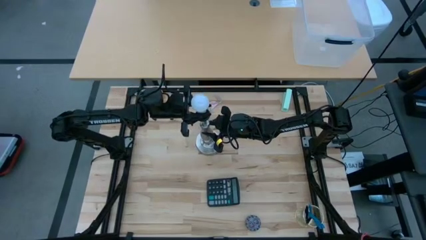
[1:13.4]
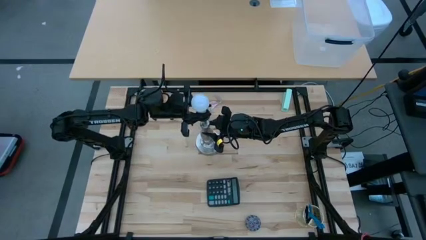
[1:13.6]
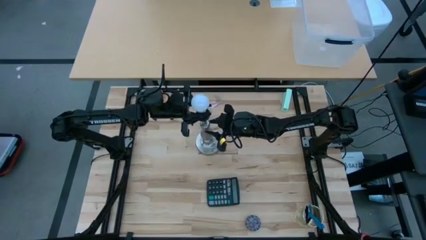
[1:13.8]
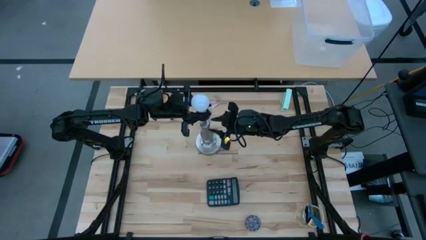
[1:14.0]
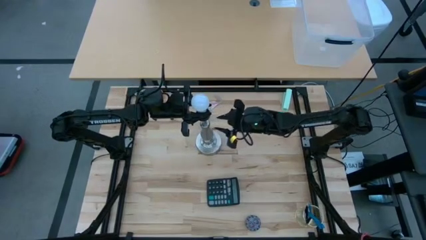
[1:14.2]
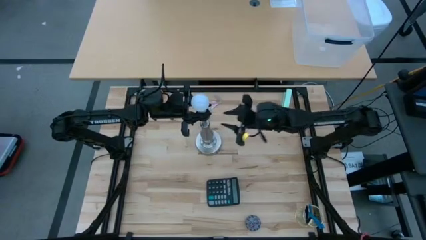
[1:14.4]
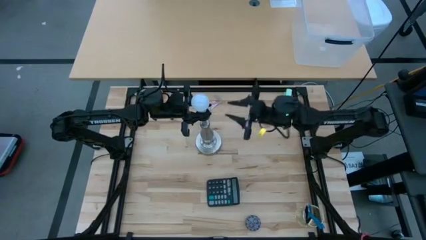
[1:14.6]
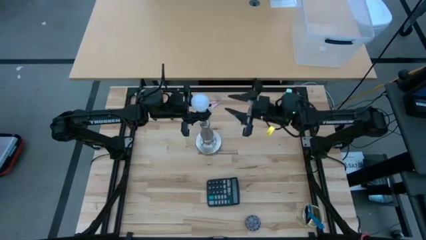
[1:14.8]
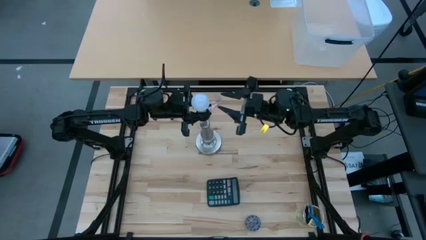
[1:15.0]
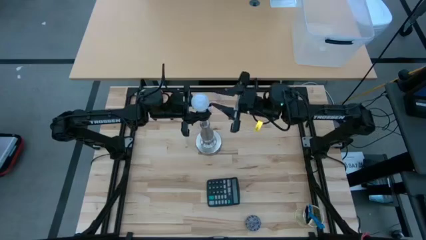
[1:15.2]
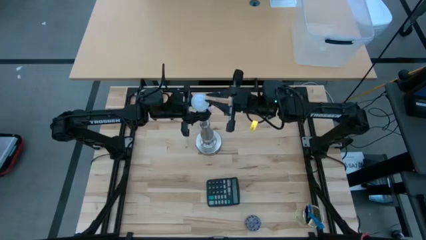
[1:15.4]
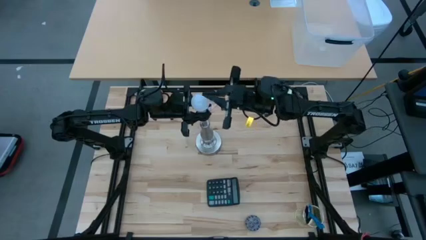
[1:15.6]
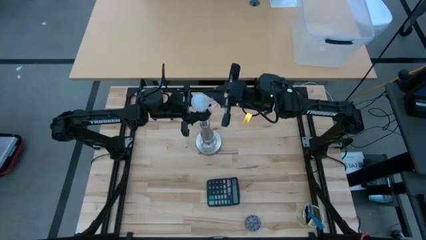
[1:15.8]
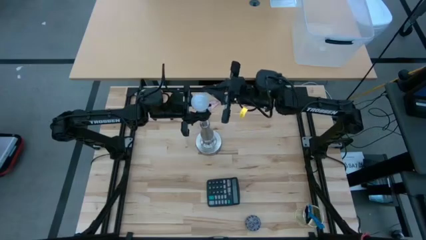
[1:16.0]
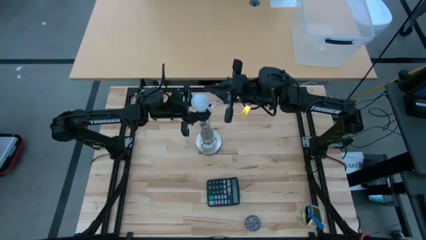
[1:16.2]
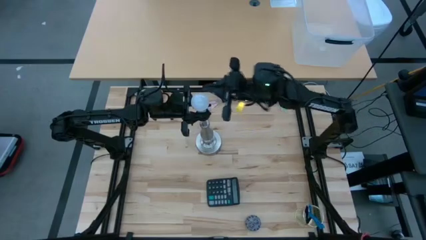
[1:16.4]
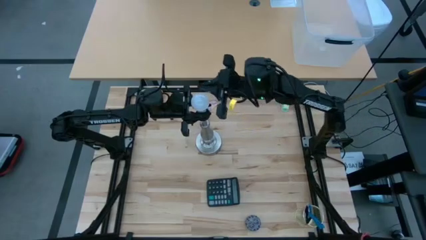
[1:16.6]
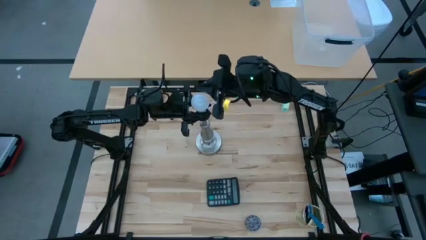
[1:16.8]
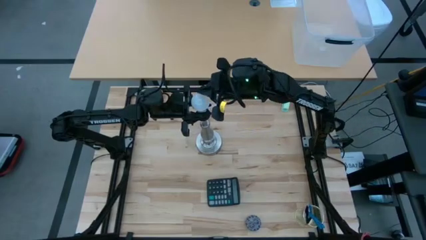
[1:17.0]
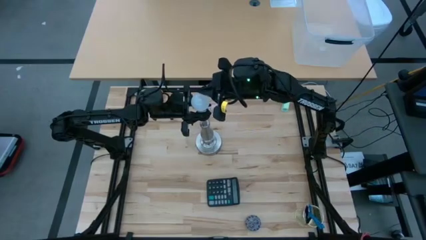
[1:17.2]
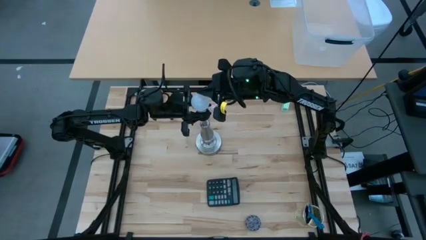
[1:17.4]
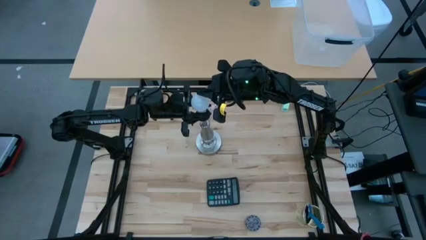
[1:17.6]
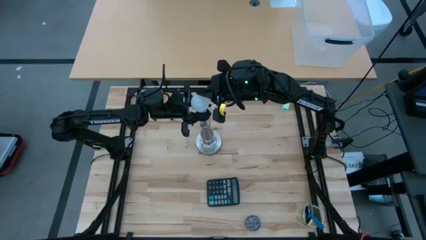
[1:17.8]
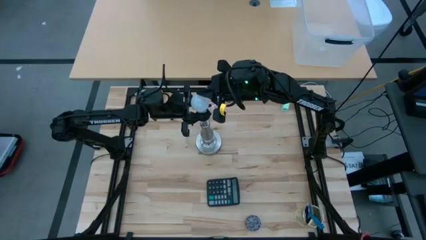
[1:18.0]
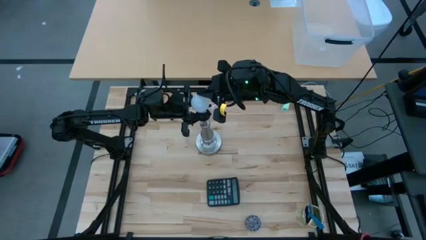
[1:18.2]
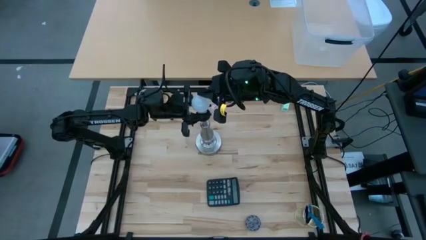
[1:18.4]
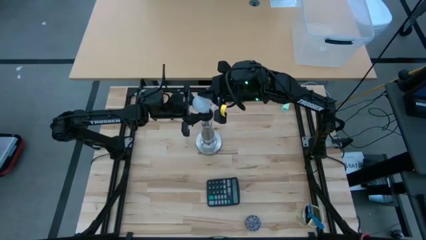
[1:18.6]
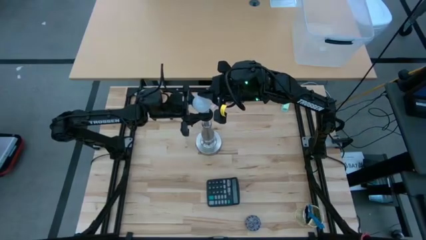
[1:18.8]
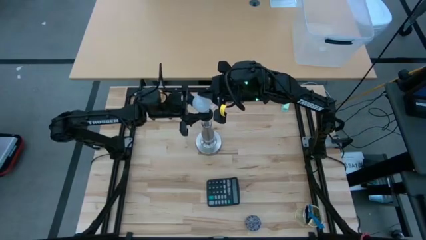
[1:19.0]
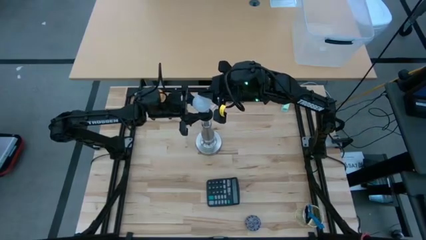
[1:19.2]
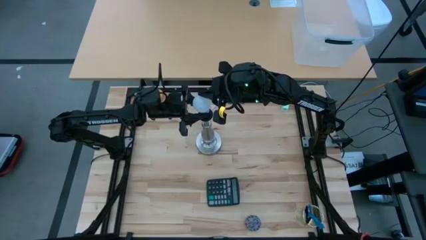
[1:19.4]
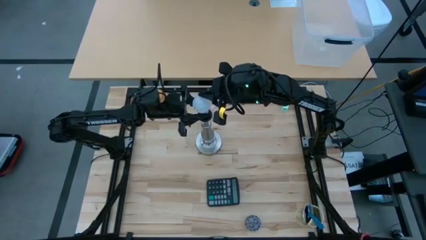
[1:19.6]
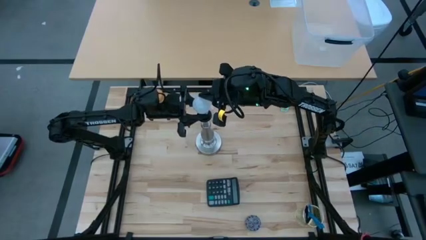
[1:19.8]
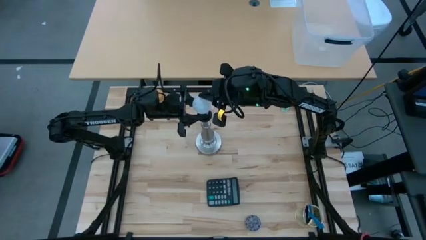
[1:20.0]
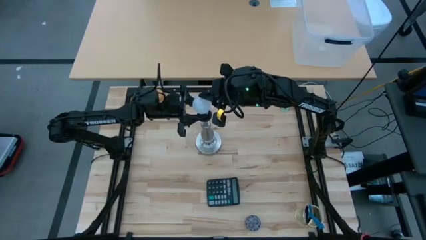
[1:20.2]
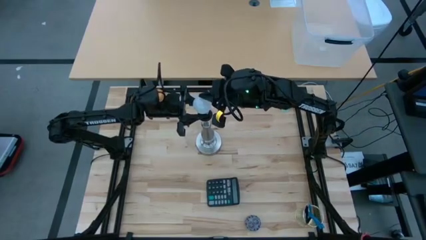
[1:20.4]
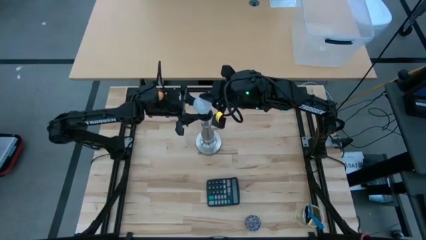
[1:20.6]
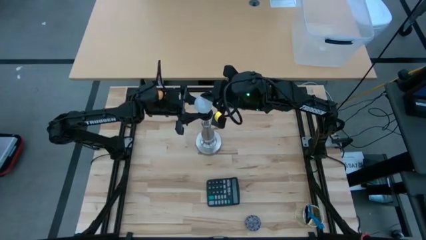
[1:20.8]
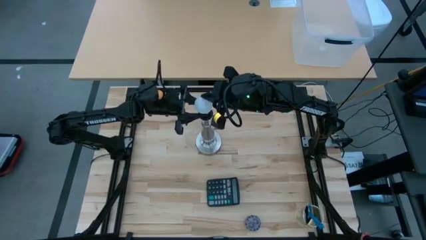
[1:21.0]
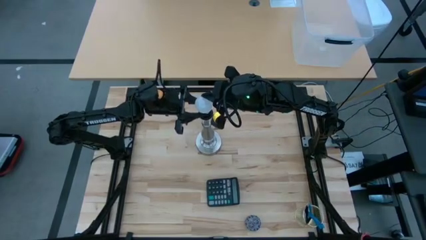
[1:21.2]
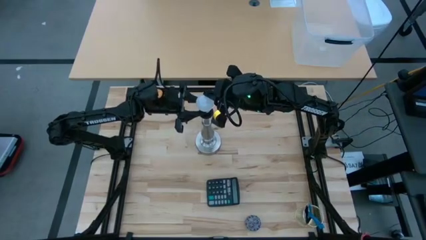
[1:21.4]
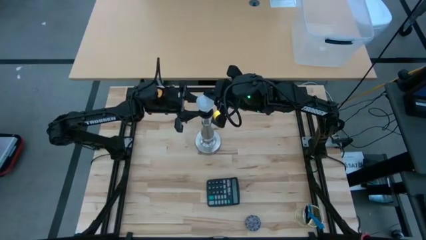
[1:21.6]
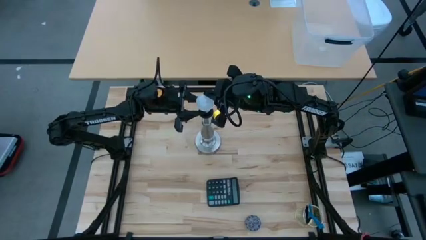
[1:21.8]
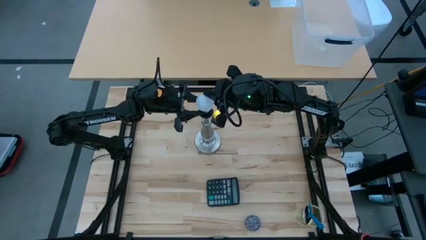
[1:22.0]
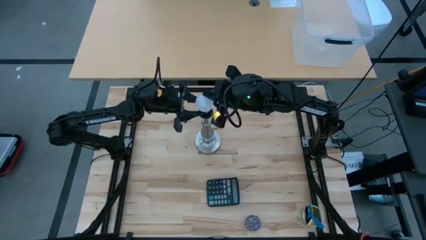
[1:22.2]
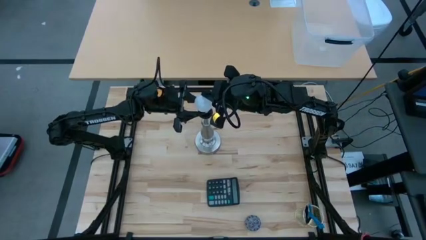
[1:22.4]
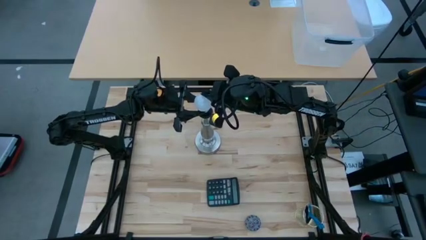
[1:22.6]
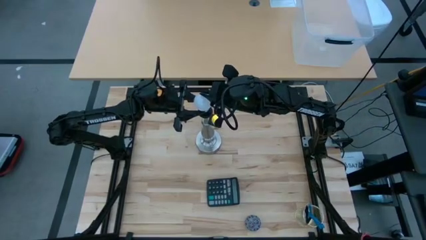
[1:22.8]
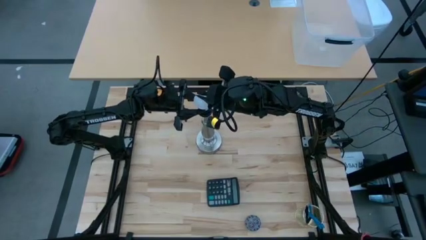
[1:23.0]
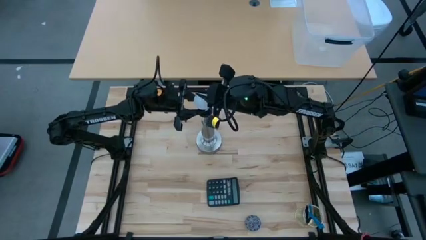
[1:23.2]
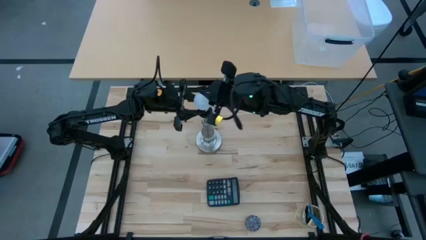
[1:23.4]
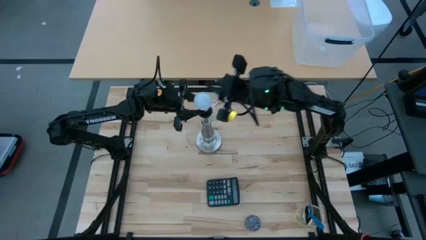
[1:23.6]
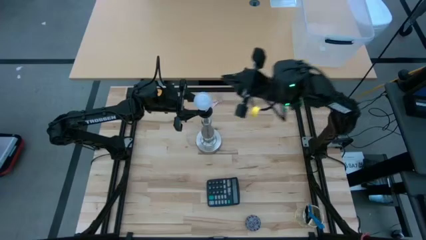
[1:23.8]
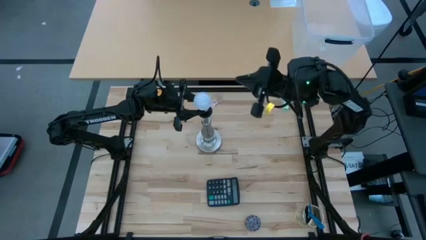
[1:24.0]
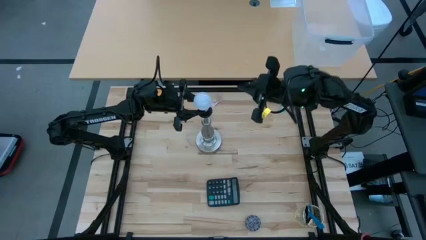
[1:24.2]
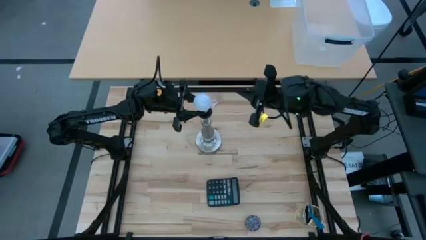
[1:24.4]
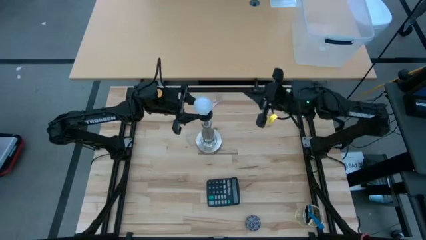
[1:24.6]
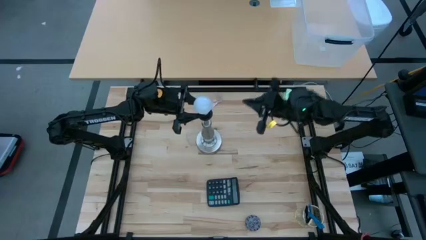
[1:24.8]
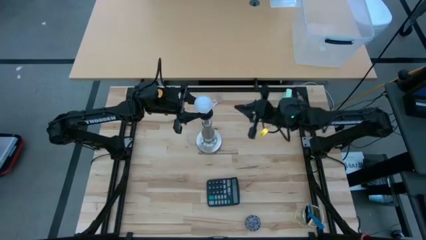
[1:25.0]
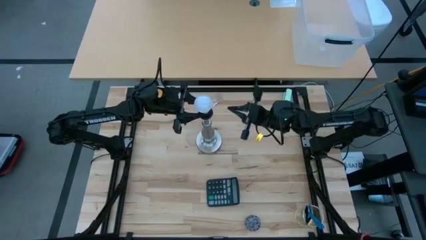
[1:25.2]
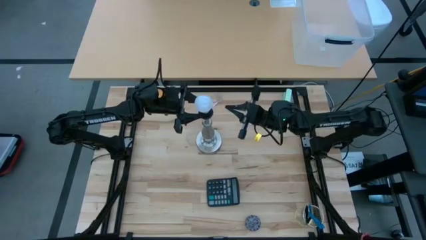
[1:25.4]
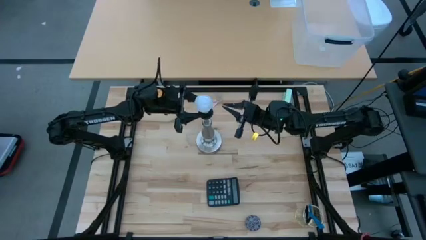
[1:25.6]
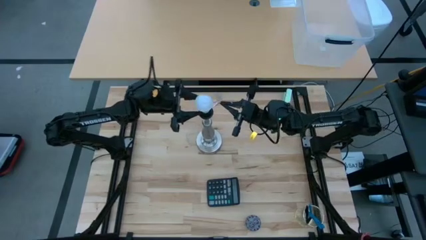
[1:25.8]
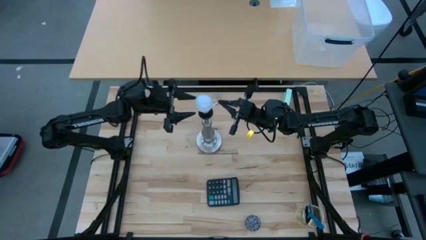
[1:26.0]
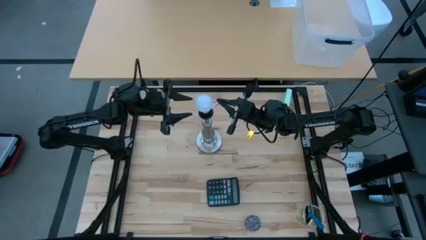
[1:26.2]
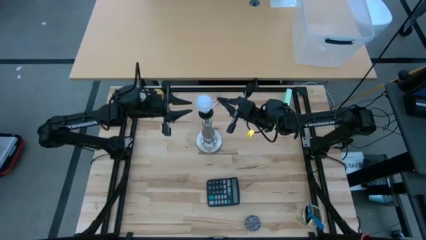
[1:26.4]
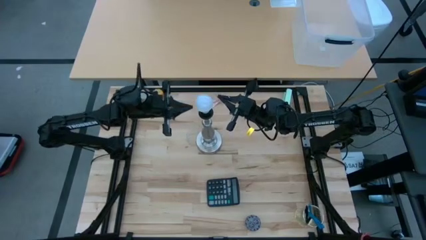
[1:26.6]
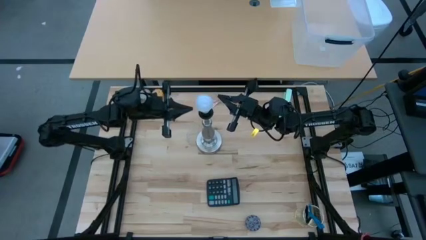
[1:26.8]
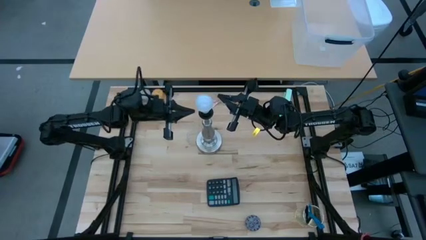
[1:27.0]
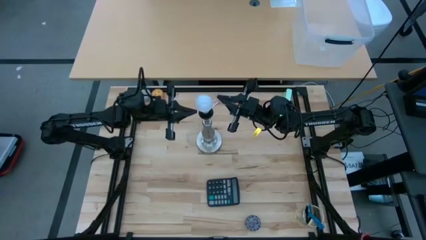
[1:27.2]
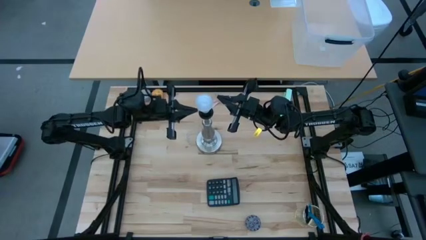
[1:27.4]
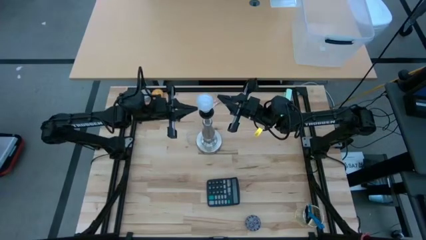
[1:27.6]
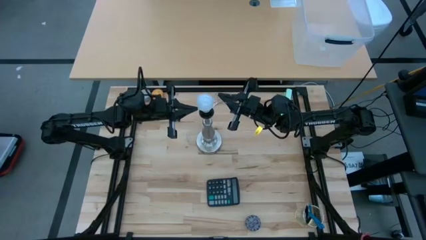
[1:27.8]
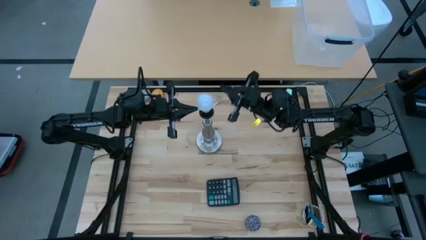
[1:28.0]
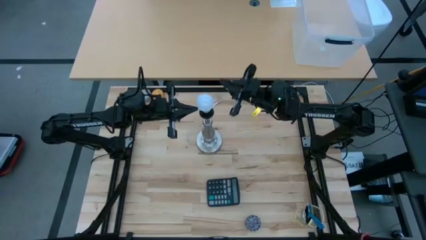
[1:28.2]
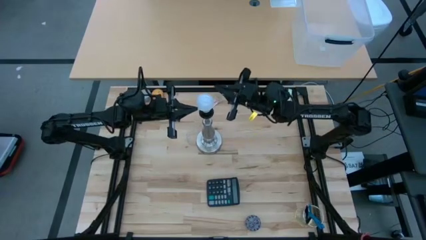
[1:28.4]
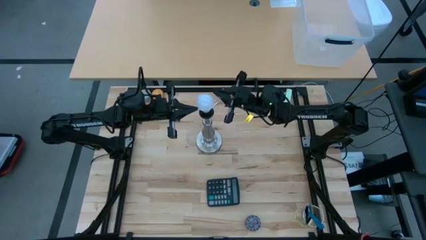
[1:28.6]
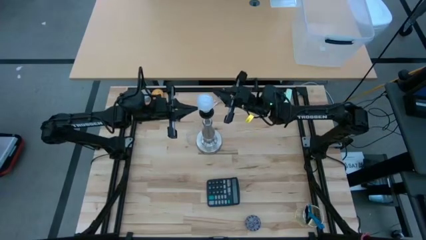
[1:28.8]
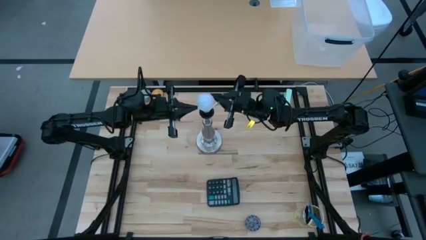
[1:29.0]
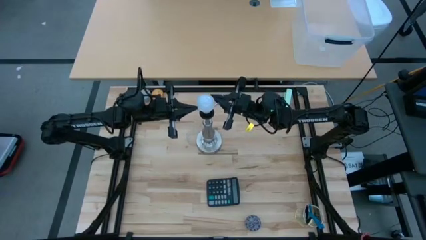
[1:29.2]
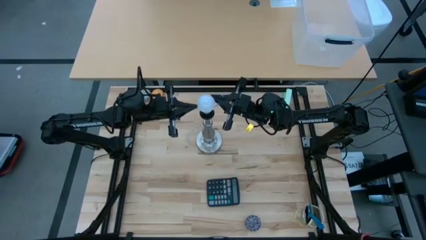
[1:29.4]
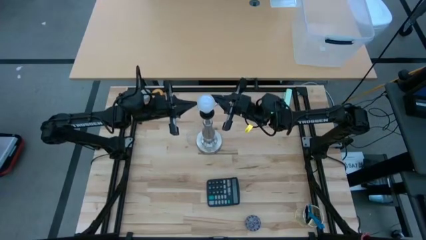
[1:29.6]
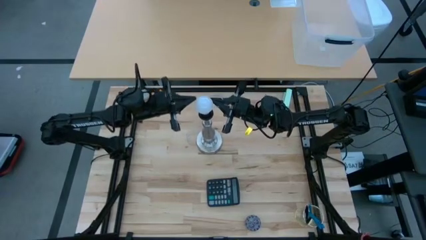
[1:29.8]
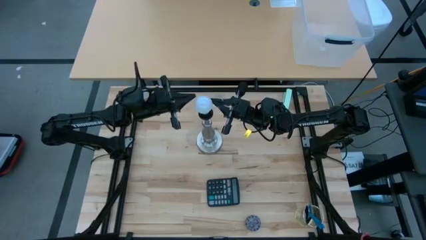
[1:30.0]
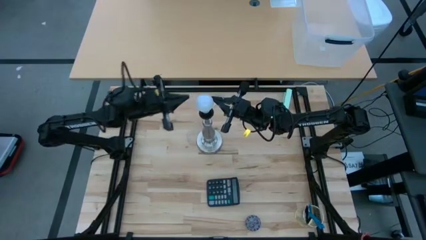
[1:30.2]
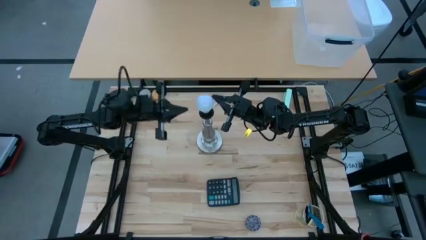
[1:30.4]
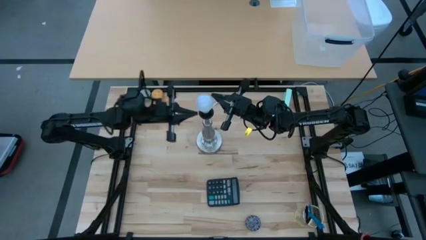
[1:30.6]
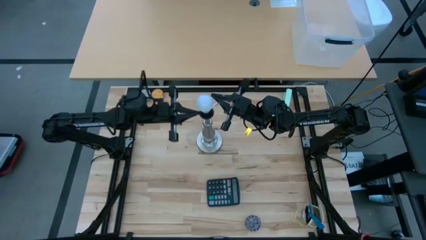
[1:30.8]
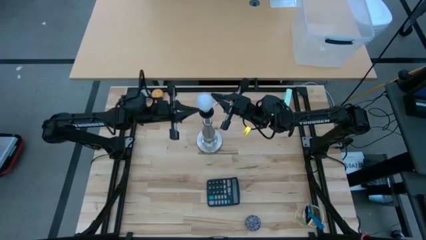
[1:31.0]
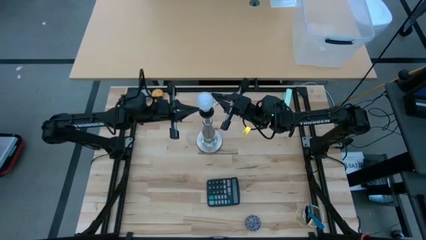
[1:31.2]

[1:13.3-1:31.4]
Task: Screw lightbulb
Insert the light bulb into the lamp
